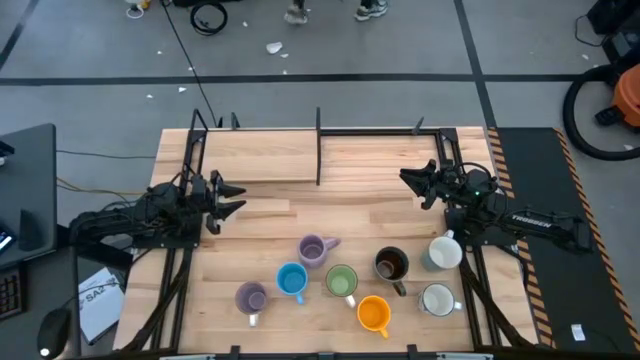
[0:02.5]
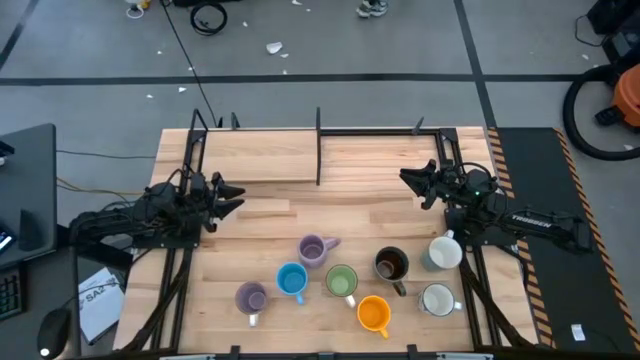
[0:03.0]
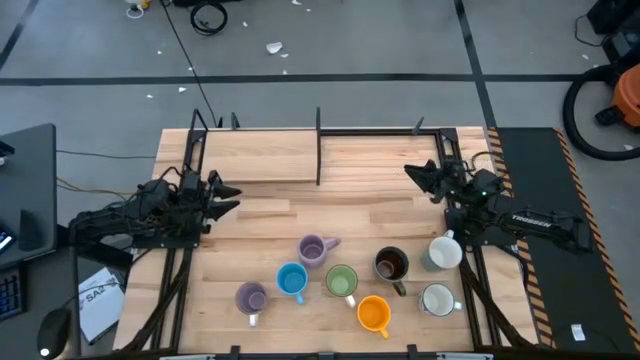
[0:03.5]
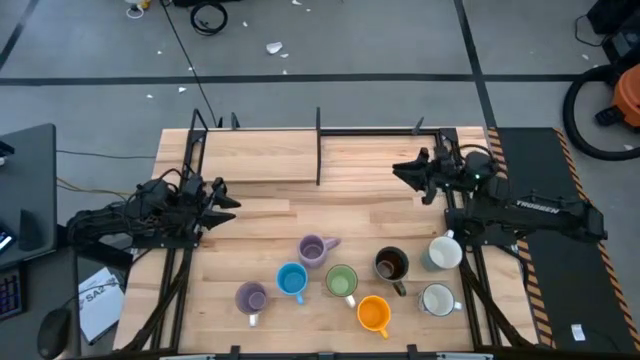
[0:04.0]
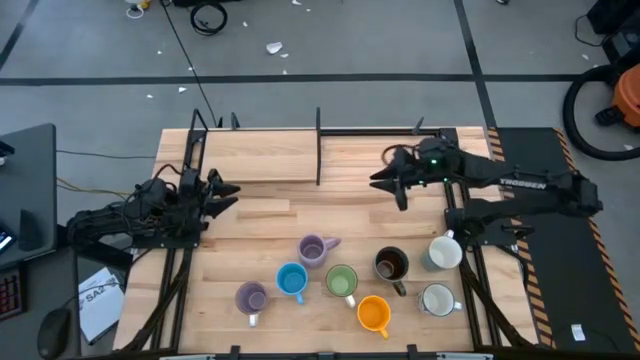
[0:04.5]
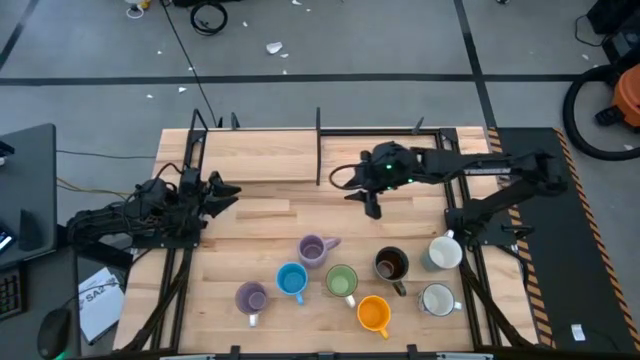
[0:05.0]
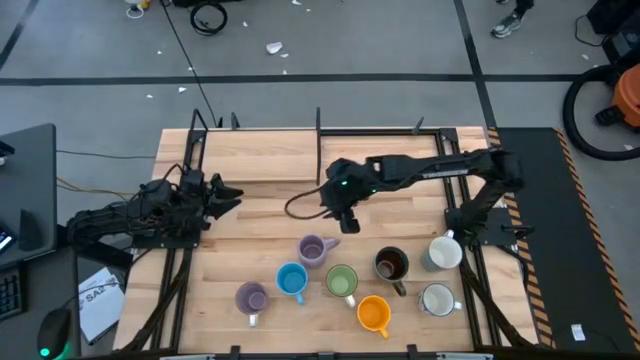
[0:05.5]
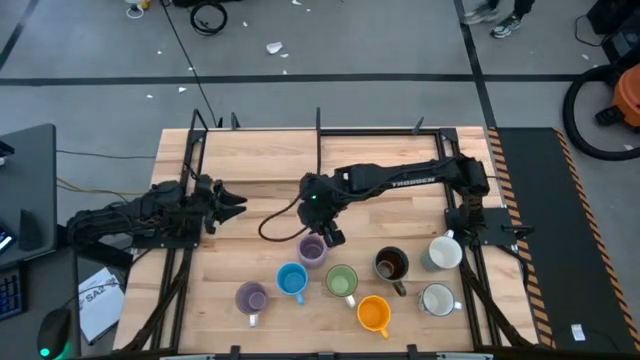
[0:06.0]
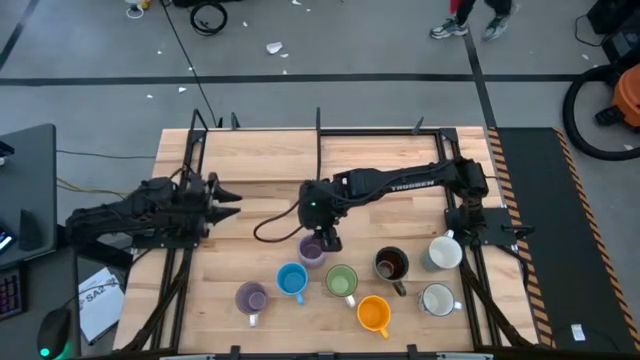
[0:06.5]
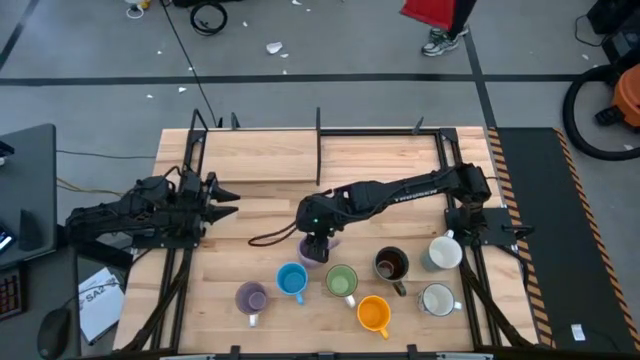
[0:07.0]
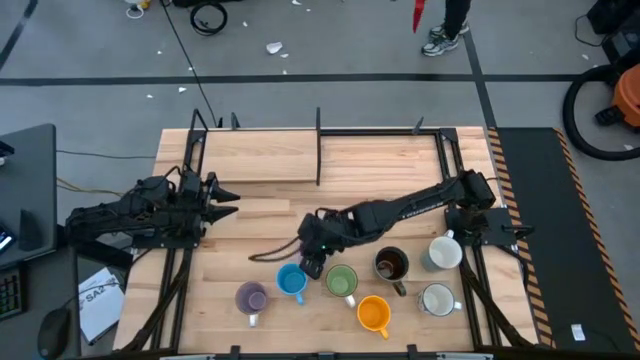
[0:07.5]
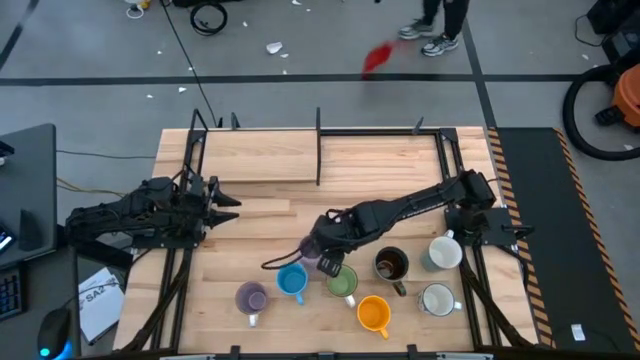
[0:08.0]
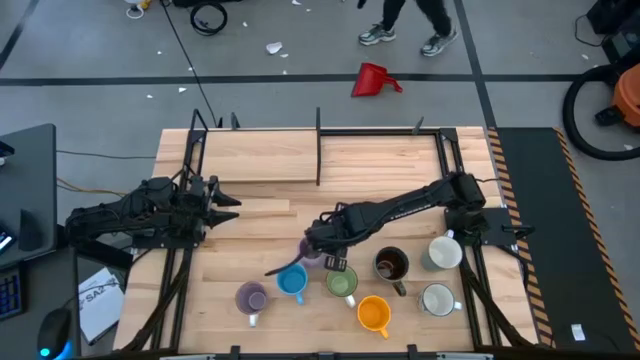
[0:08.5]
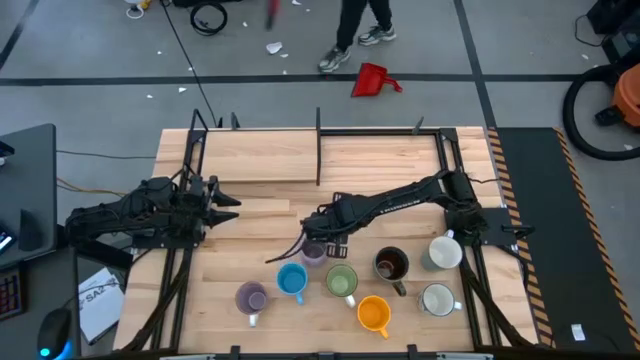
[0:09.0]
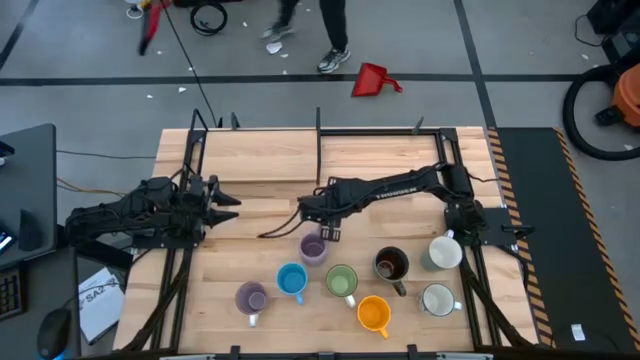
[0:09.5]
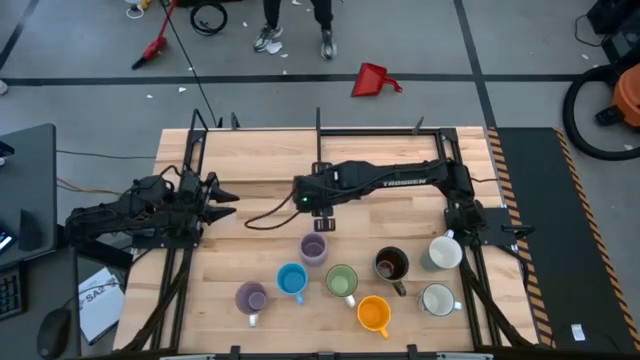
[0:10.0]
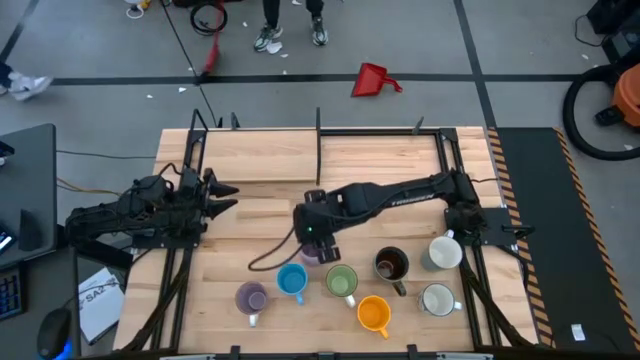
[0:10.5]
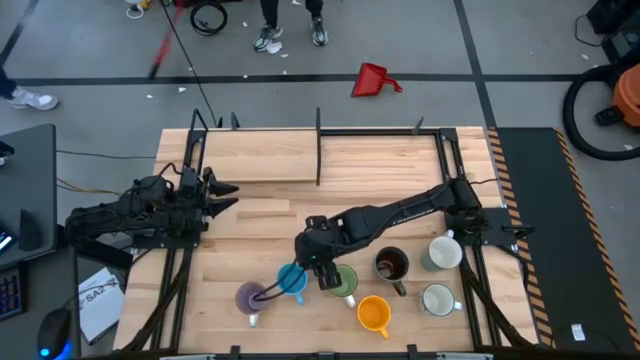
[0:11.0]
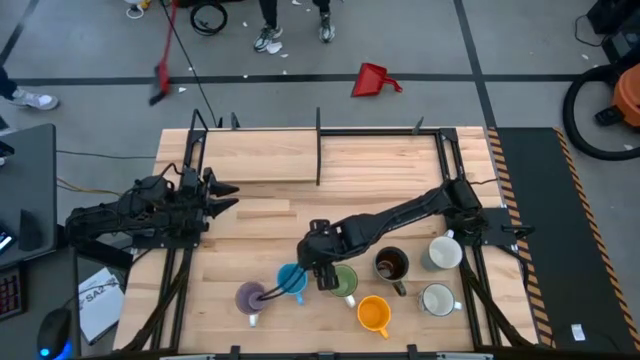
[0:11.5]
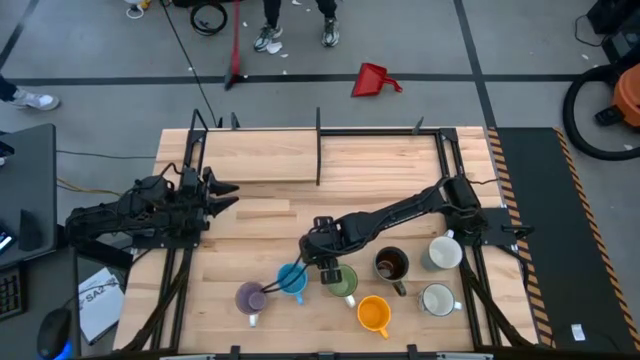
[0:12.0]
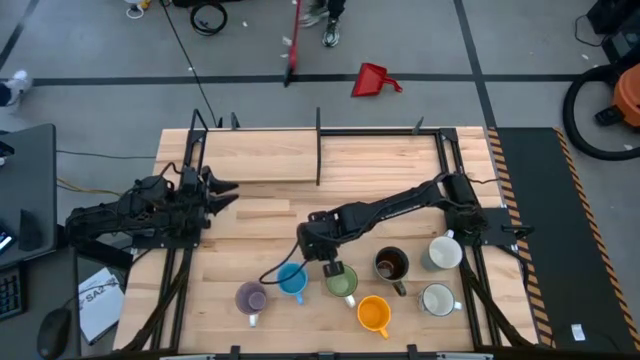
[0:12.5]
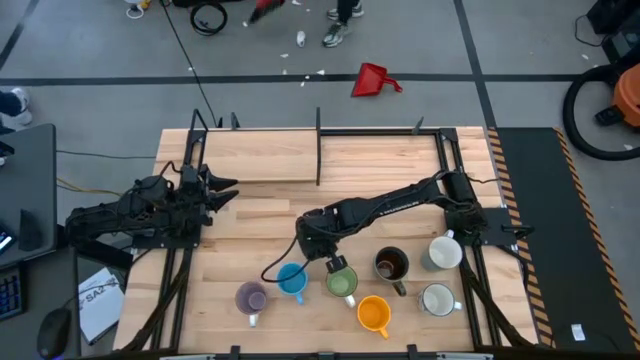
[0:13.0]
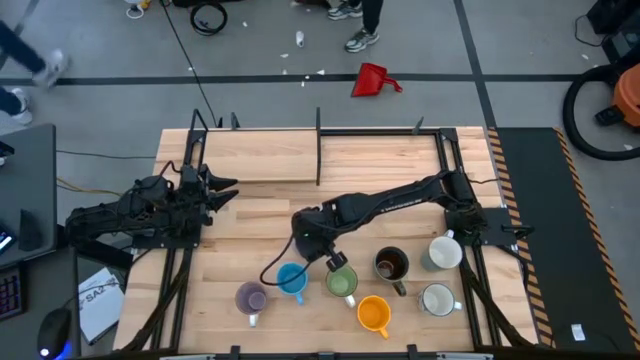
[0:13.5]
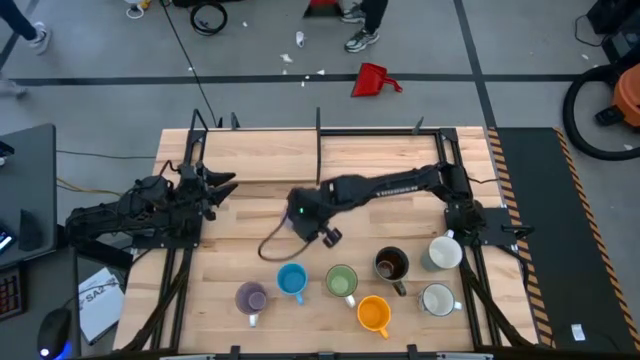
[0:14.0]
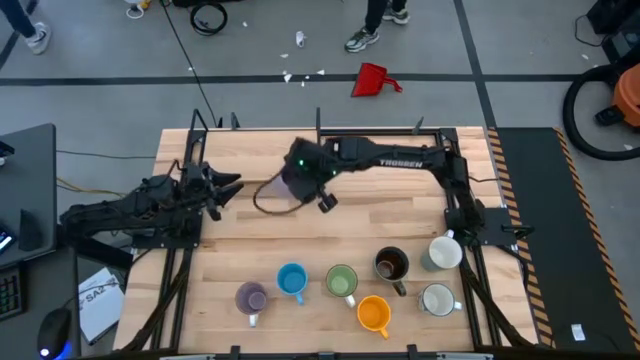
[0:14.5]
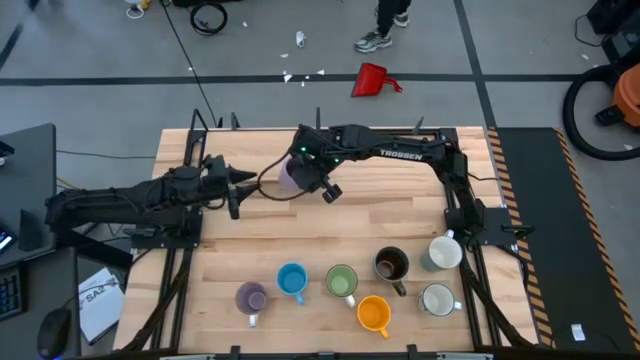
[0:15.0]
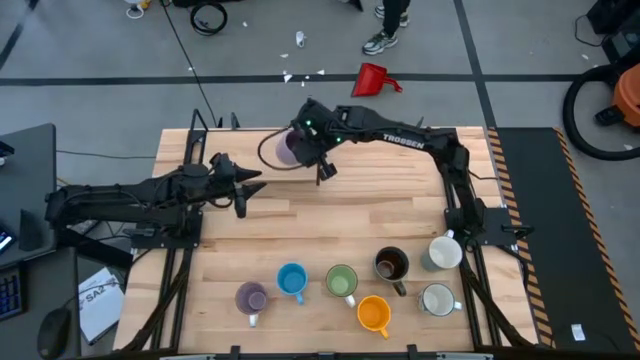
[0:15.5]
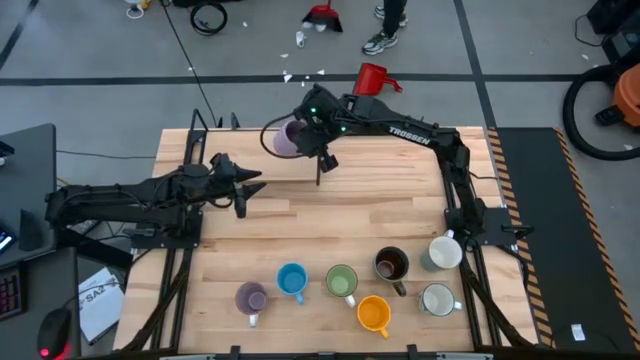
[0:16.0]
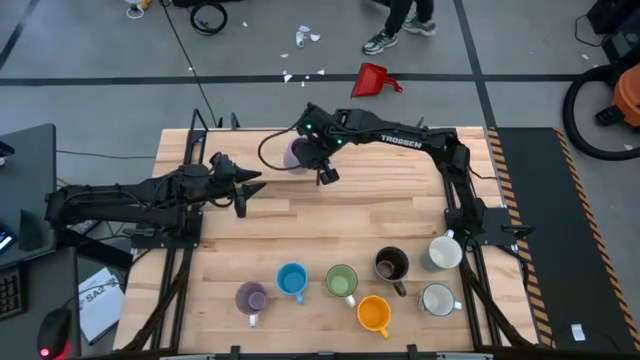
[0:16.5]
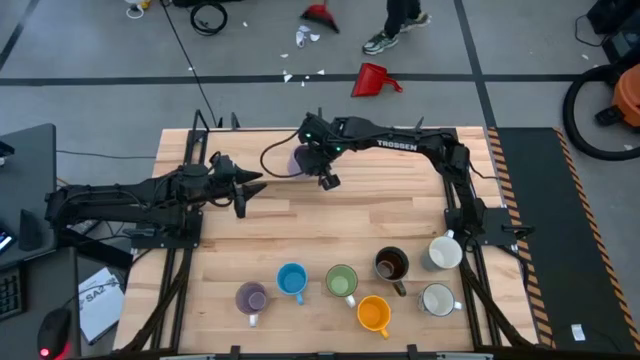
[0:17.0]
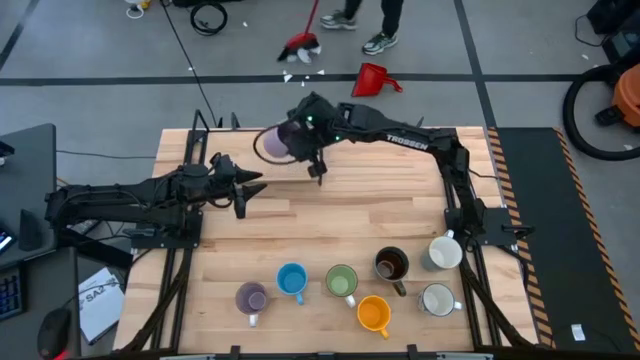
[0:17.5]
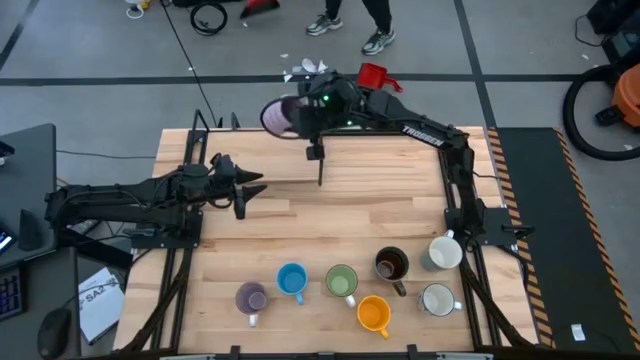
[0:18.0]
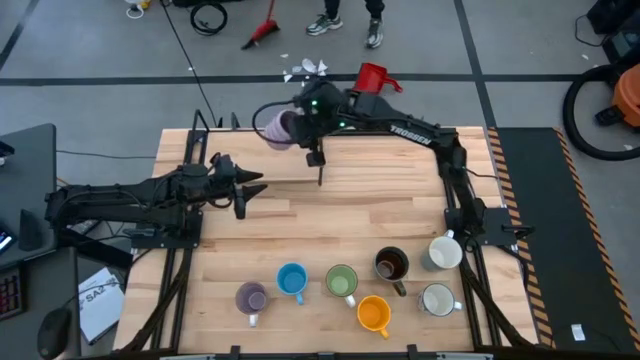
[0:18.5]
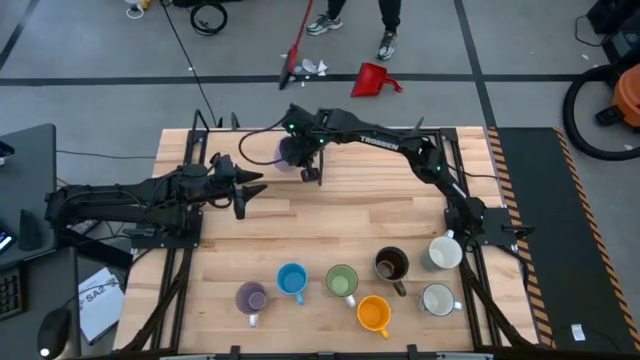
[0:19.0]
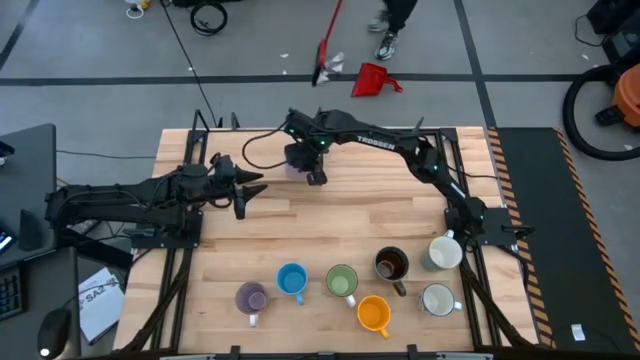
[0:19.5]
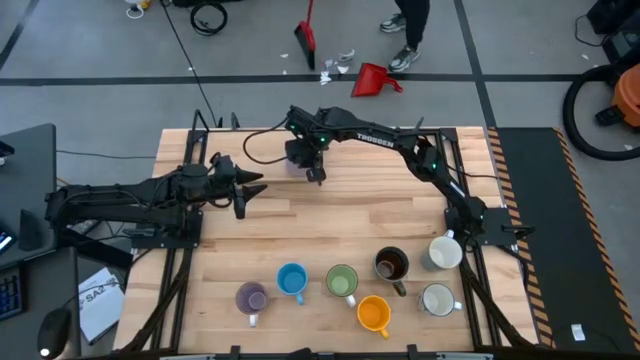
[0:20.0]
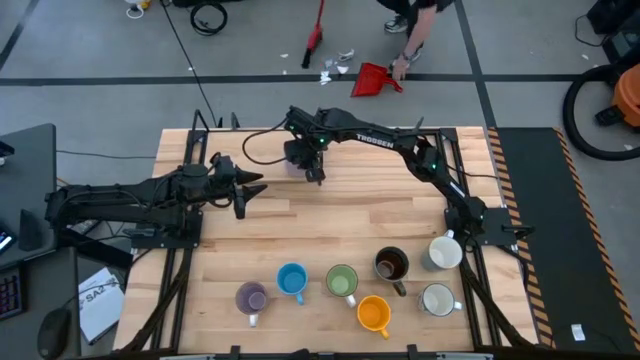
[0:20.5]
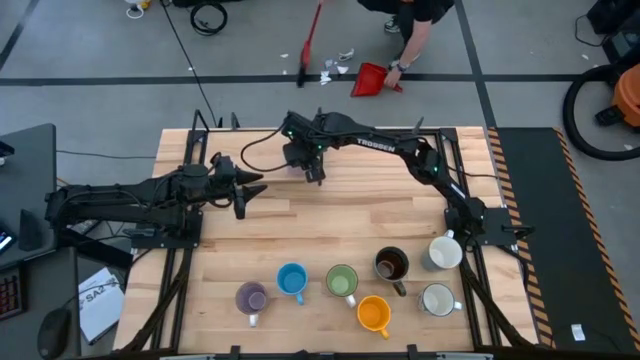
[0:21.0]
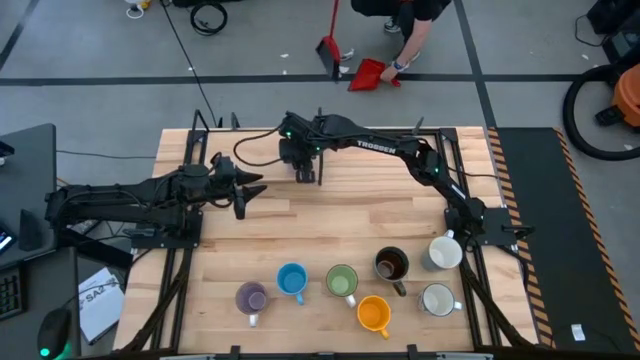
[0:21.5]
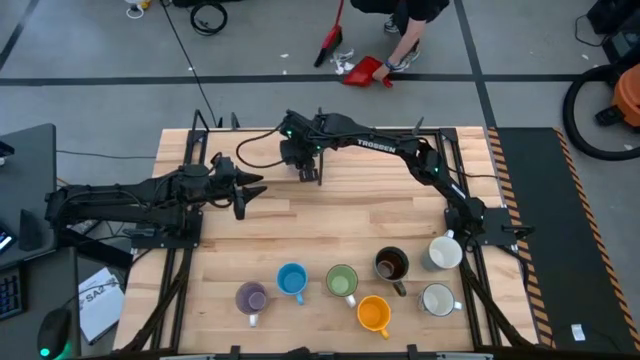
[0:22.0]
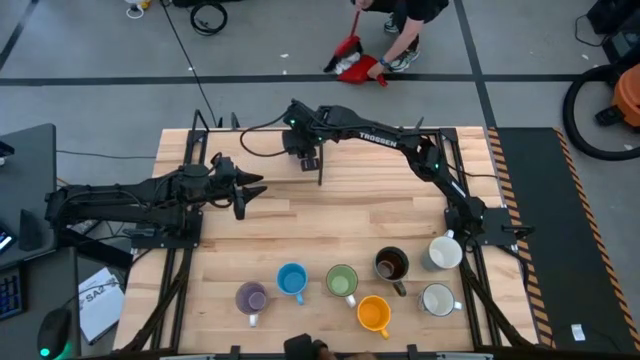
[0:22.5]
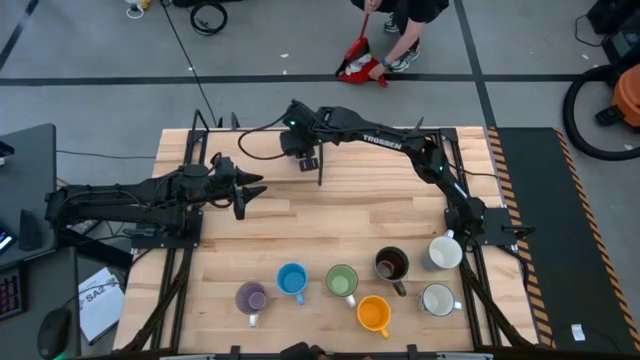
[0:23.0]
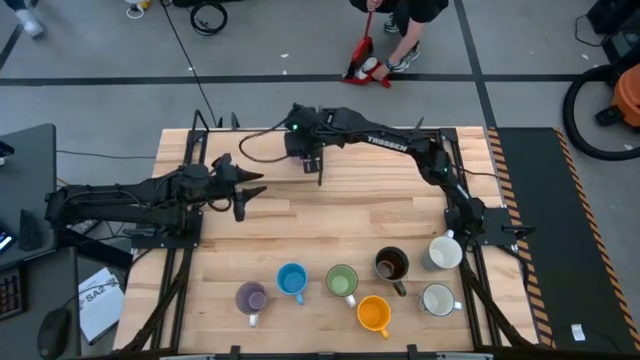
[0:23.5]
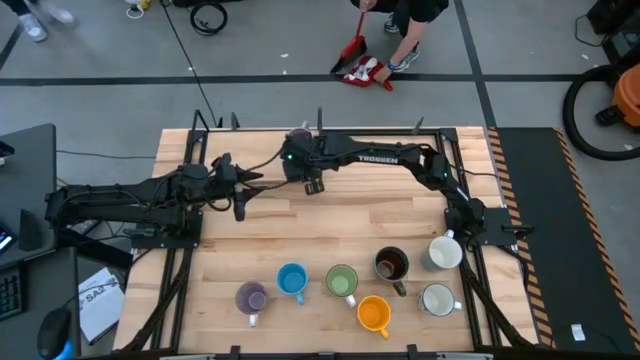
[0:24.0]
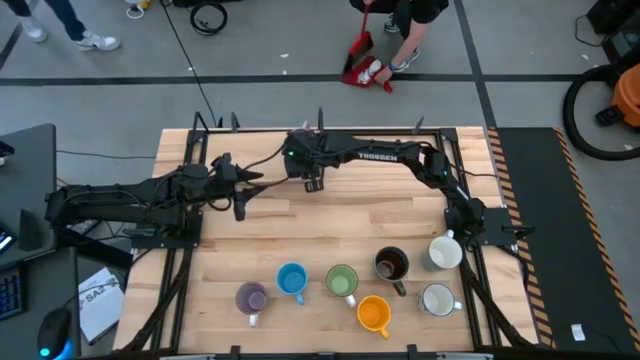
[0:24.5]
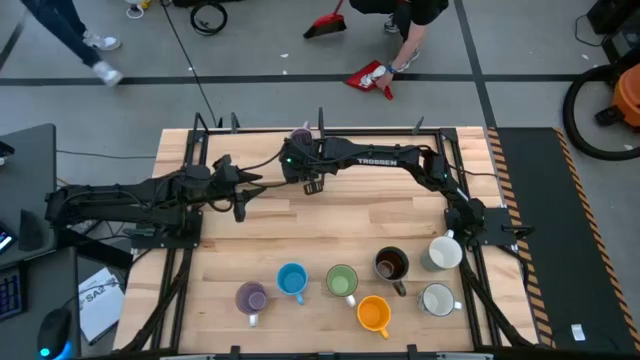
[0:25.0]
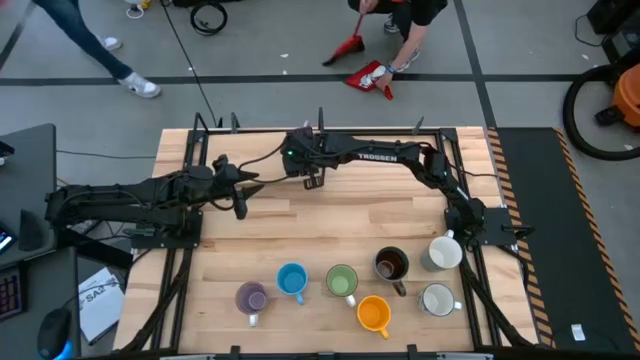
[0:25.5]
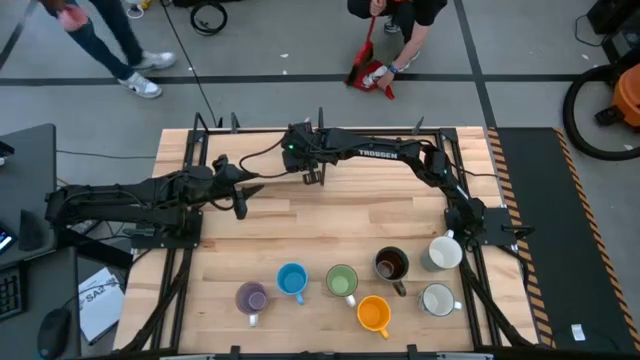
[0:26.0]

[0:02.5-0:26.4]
Task: Place coffee mugs
Put the violet mug on the shelf
